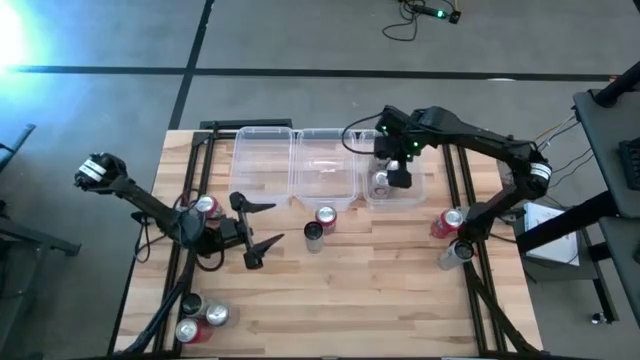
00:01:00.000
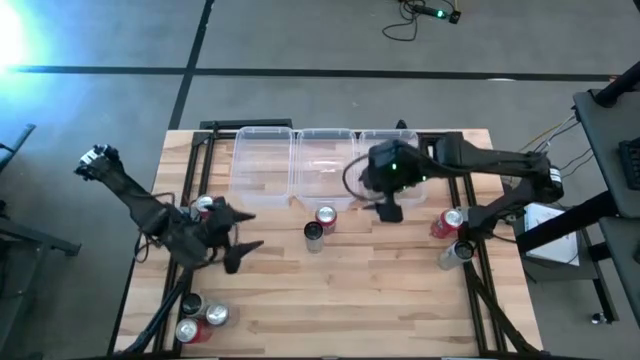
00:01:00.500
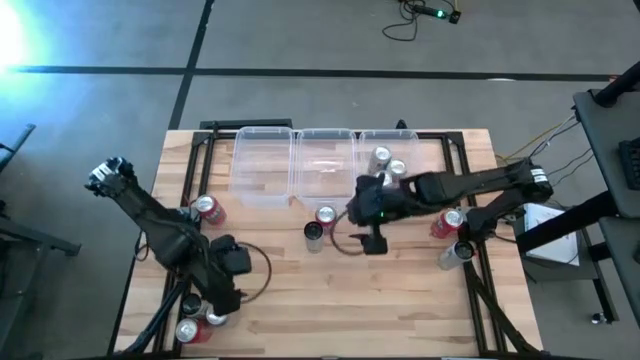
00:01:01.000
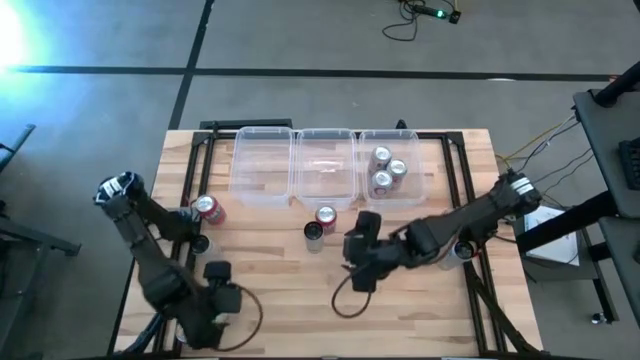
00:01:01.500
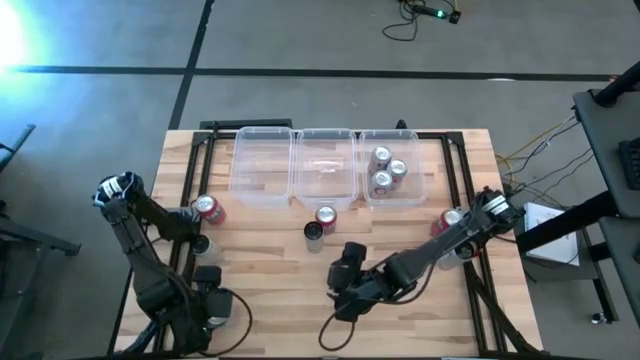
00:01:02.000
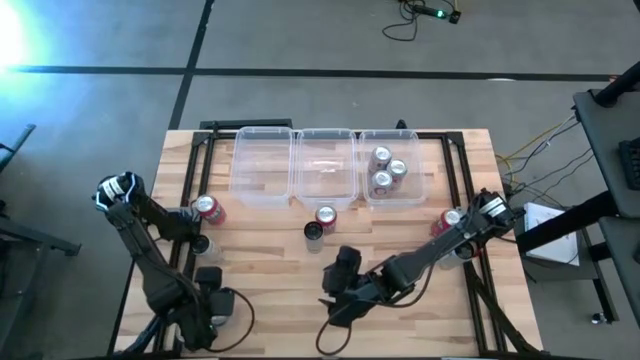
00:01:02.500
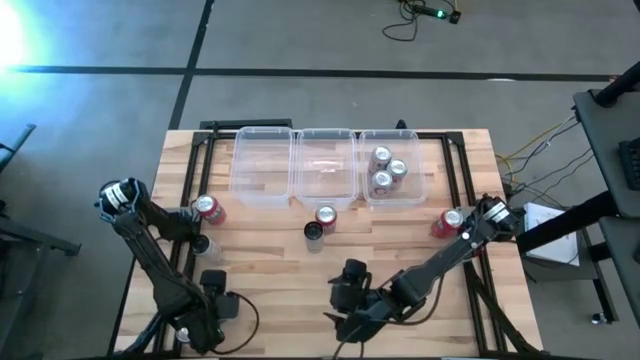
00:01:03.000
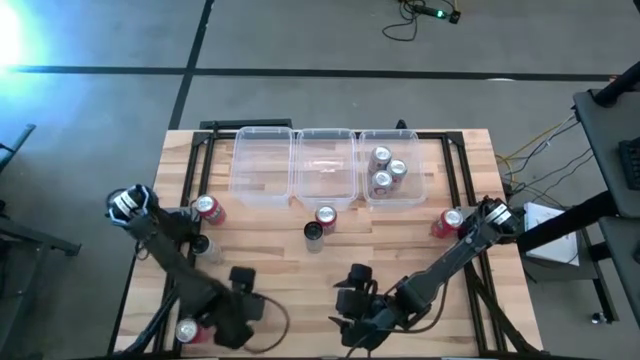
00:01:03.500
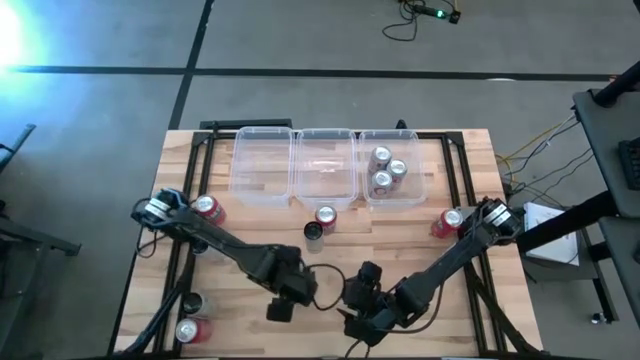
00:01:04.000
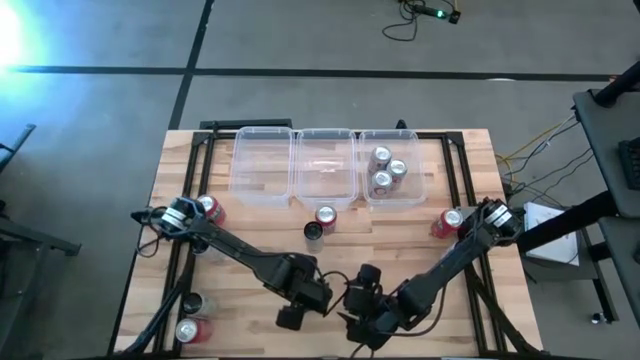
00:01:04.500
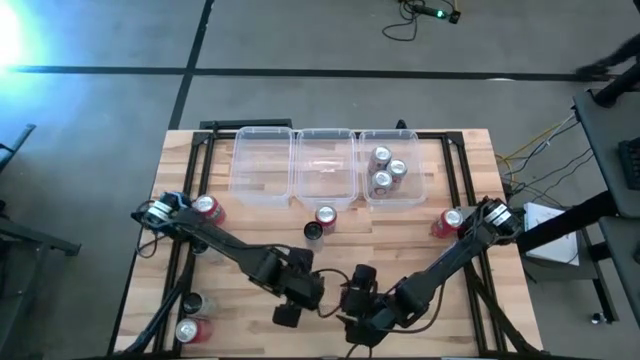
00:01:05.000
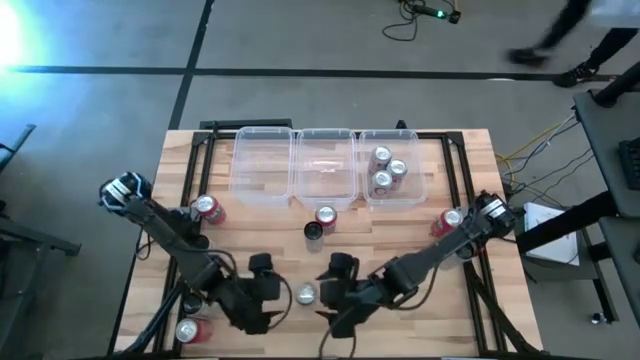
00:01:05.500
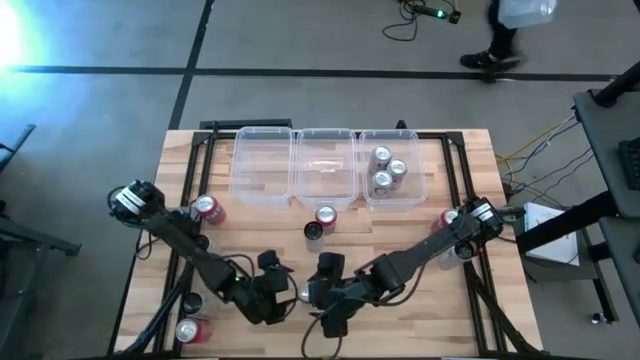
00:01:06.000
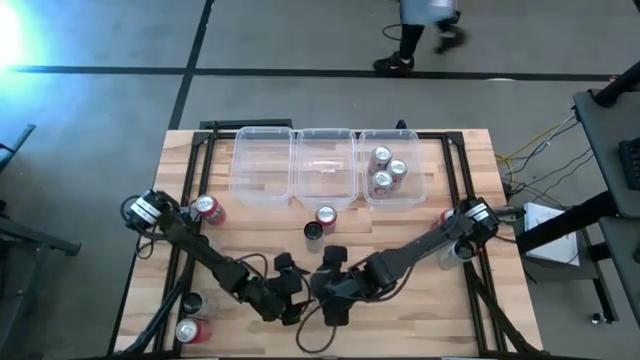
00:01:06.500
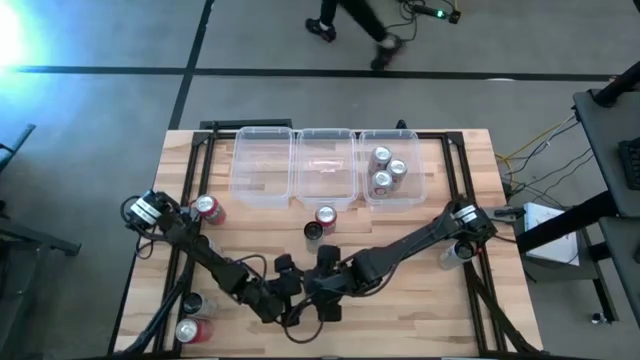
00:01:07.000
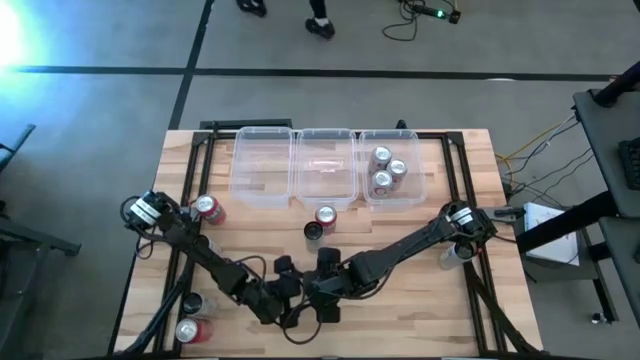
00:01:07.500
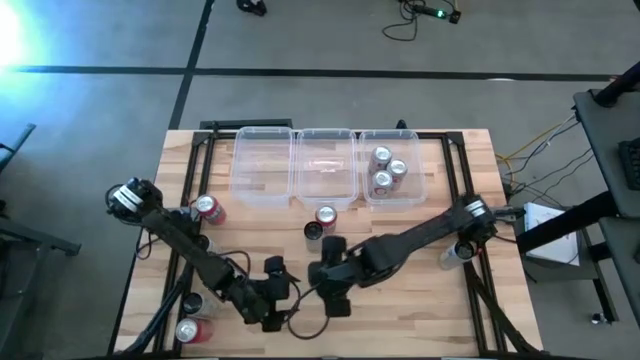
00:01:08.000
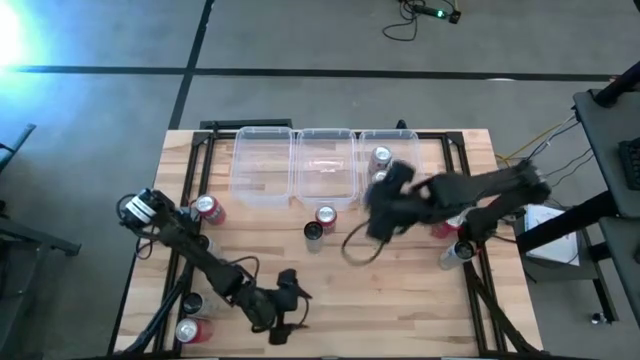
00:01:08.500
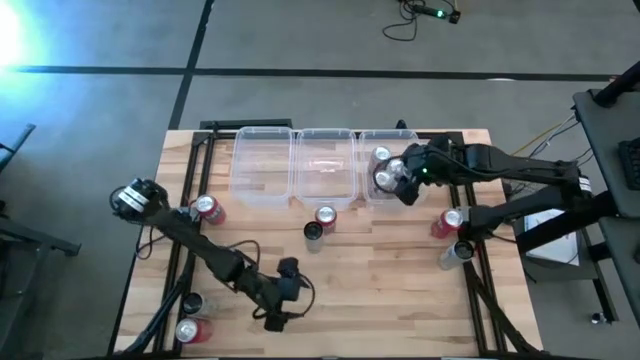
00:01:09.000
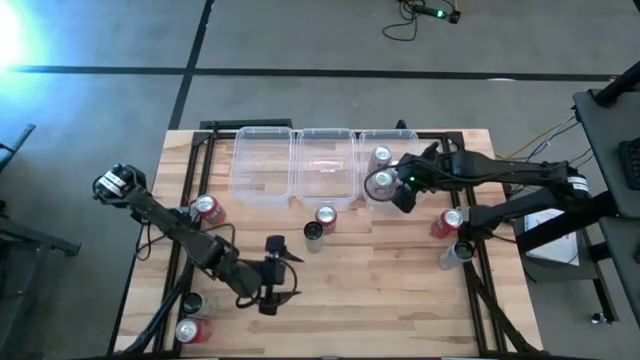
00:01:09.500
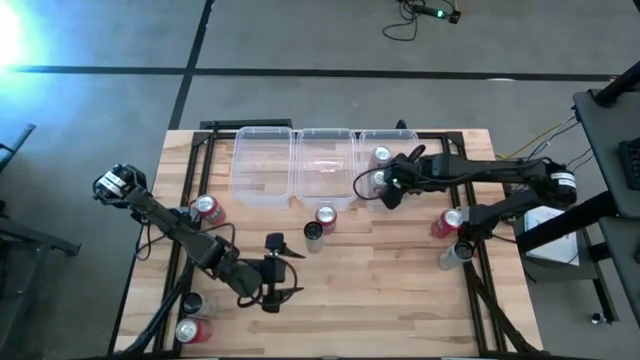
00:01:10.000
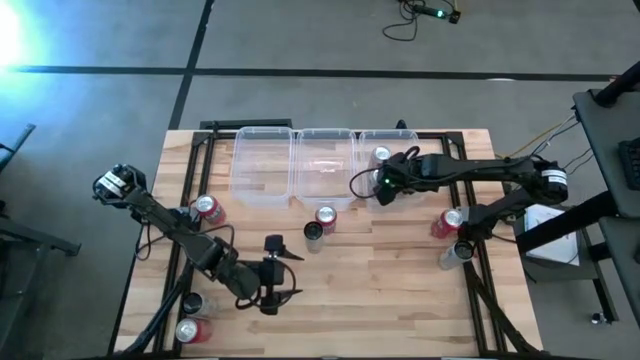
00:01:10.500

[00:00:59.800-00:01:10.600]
Task: Sort soda cans
Put the red silver soda can into the right transparent bin

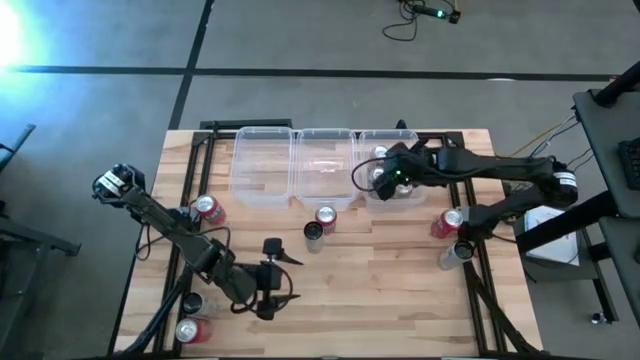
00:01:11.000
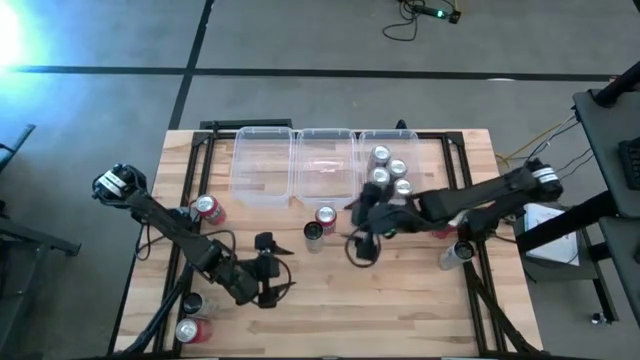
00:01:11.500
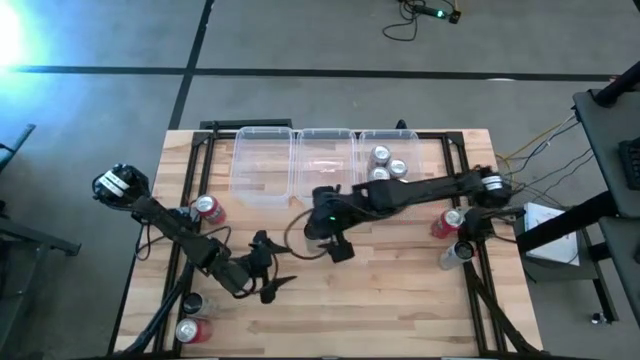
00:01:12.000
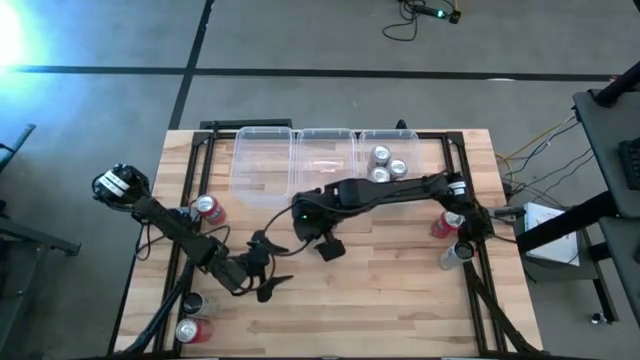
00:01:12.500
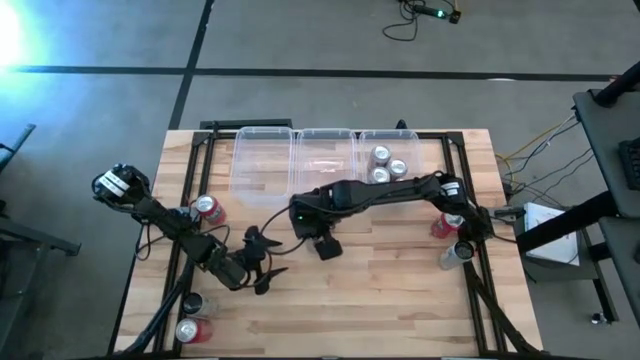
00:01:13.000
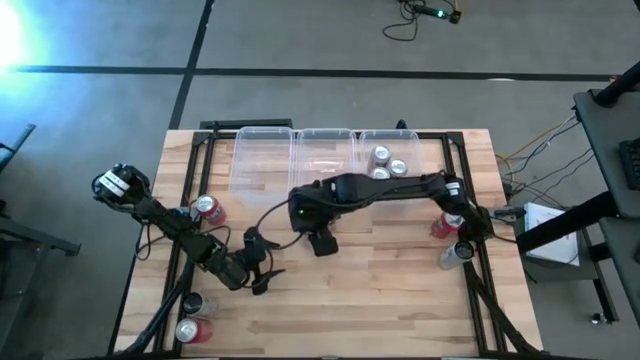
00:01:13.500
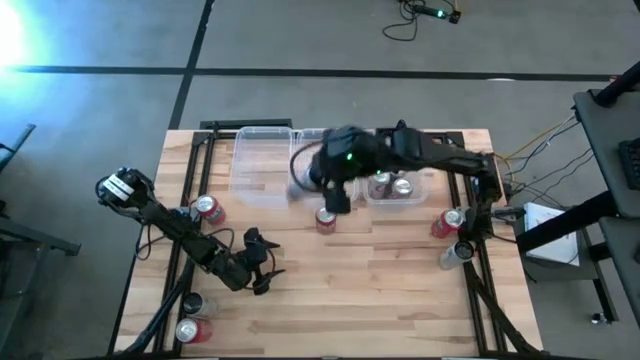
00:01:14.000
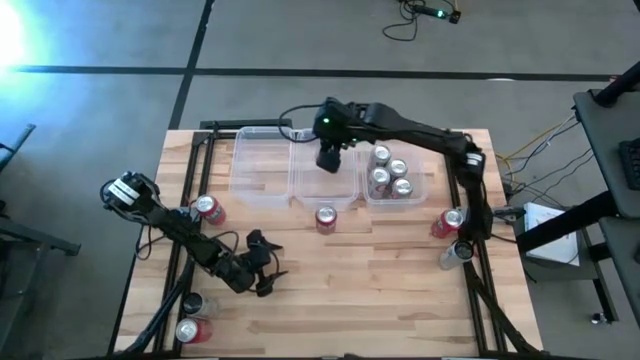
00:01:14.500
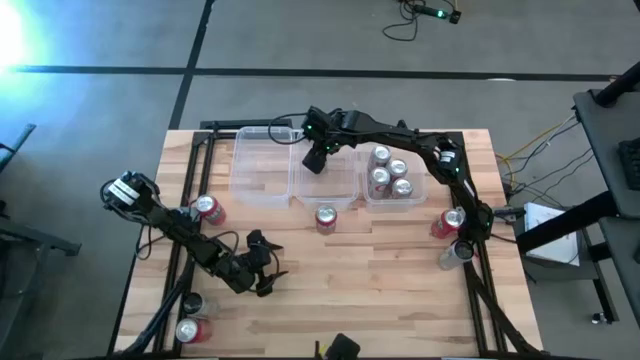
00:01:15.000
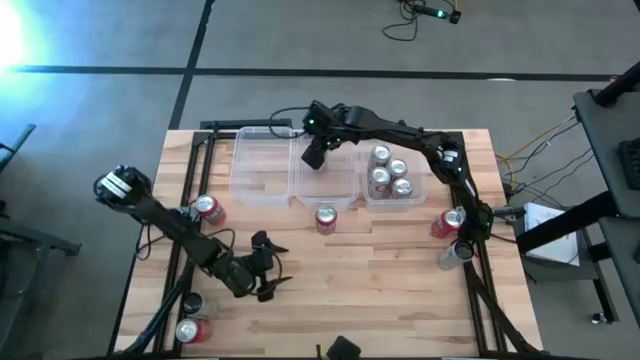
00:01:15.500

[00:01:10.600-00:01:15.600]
Put the top right white pink soda can into the middle transparent bin

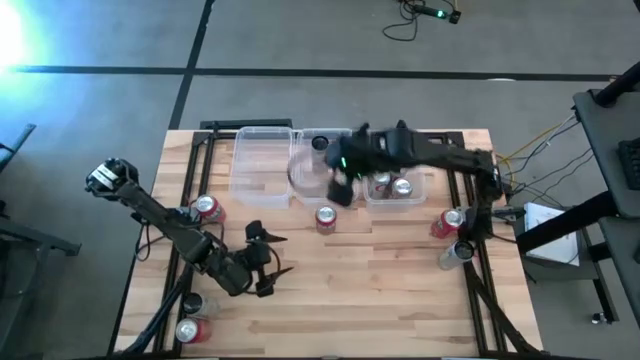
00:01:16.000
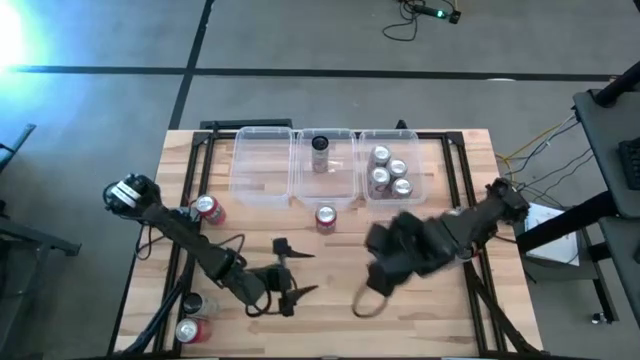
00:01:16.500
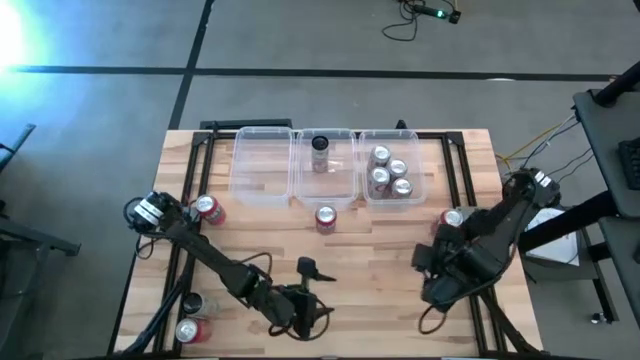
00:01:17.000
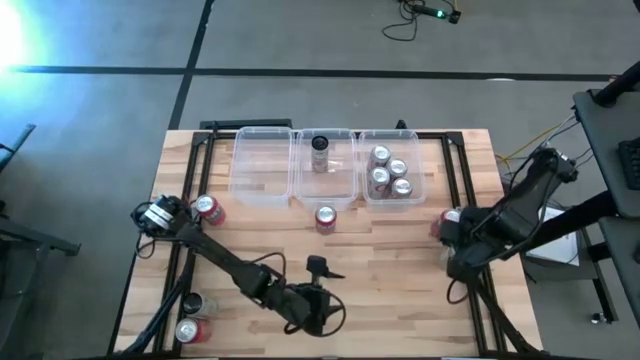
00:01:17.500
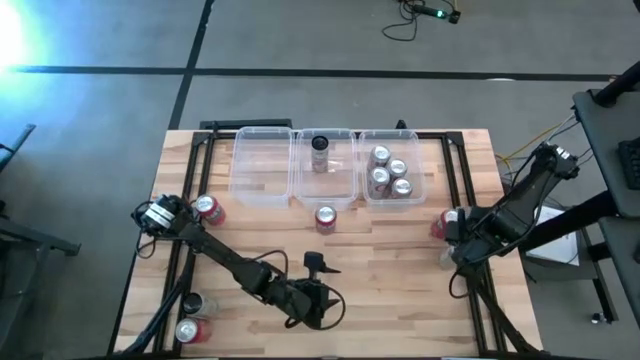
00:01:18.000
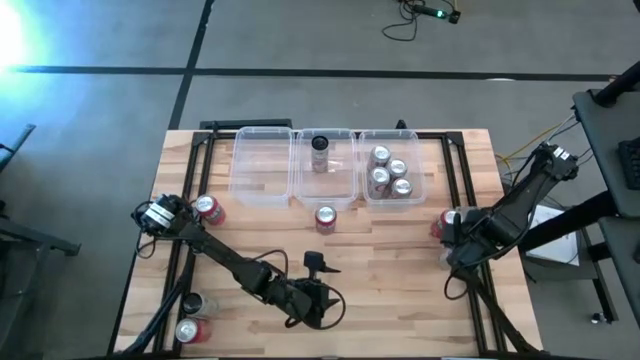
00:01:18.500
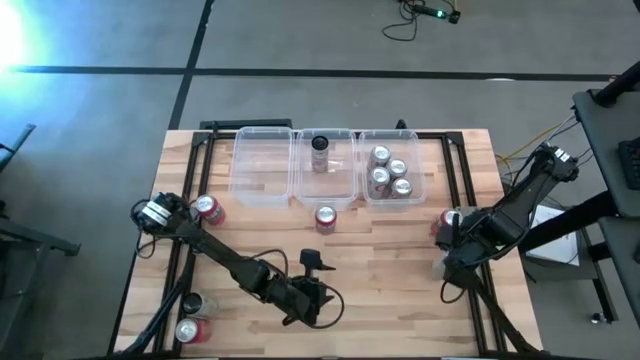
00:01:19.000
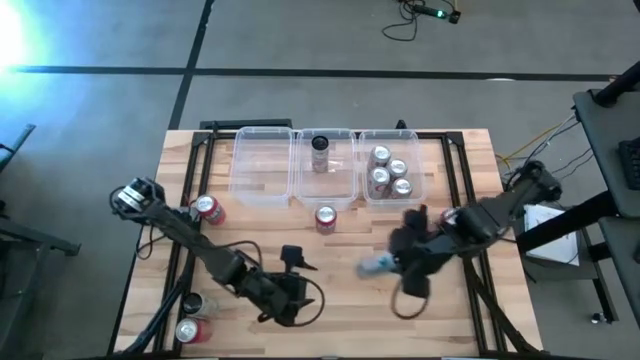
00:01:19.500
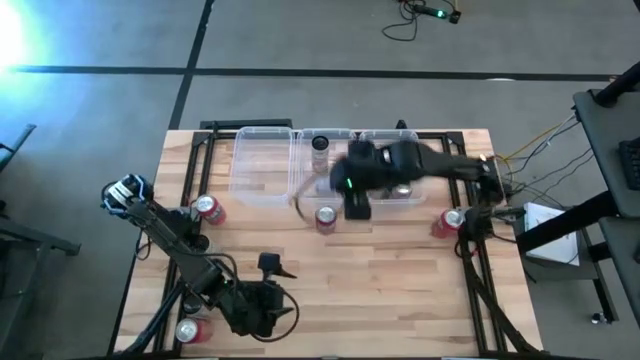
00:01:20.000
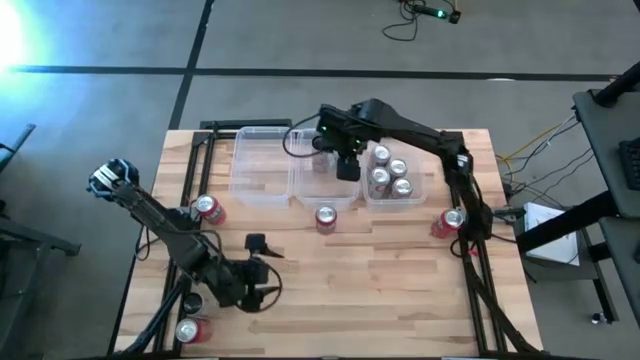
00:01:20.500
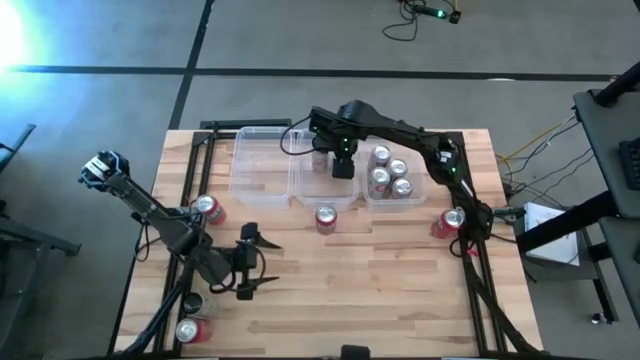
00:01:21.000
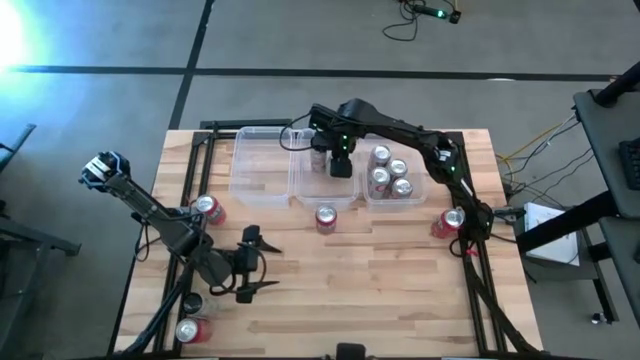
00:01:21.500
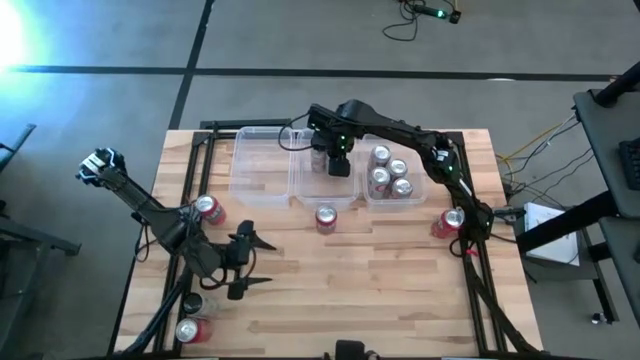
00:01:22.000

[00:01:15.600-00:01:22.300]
Put the top right white pink soda can into the middle transparent bin
